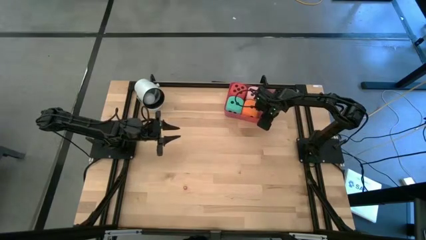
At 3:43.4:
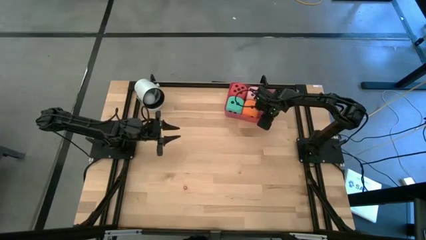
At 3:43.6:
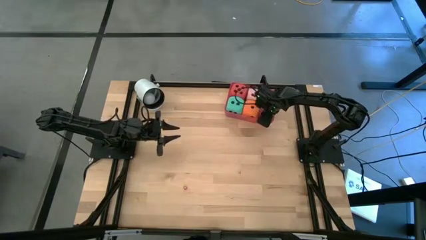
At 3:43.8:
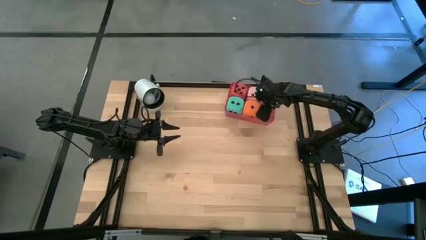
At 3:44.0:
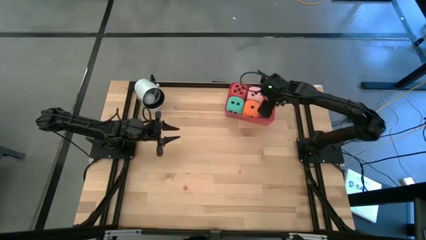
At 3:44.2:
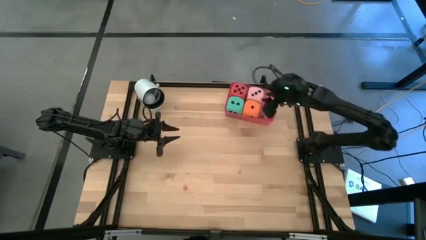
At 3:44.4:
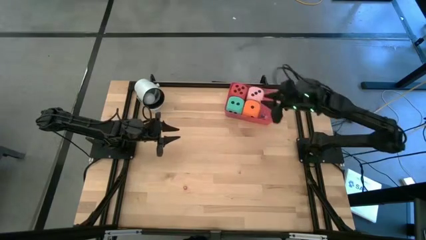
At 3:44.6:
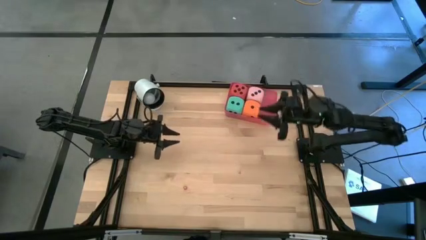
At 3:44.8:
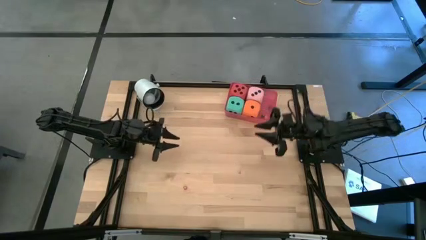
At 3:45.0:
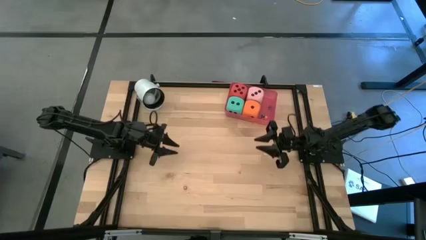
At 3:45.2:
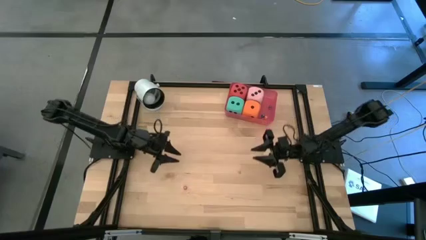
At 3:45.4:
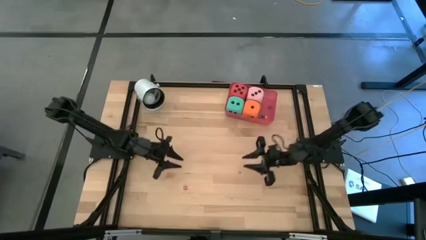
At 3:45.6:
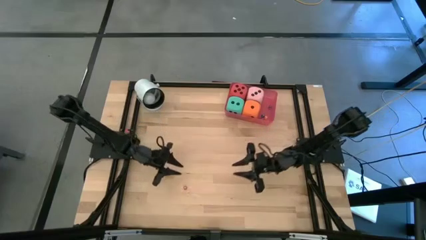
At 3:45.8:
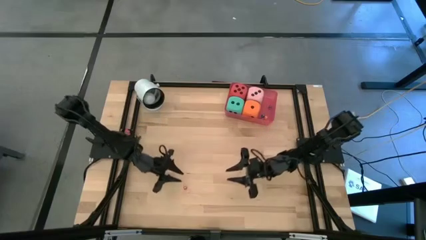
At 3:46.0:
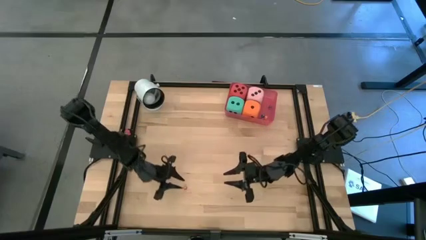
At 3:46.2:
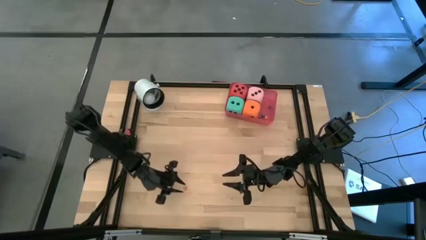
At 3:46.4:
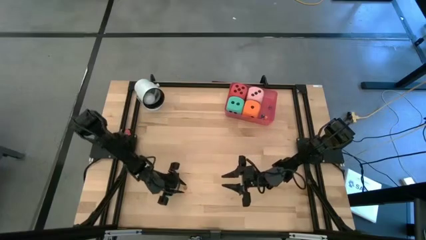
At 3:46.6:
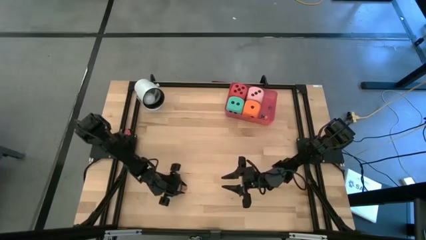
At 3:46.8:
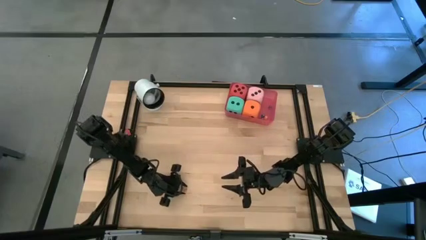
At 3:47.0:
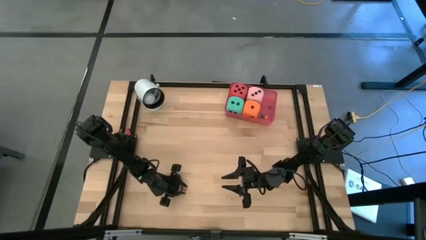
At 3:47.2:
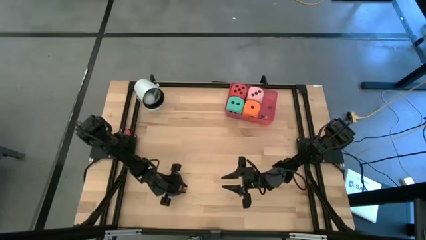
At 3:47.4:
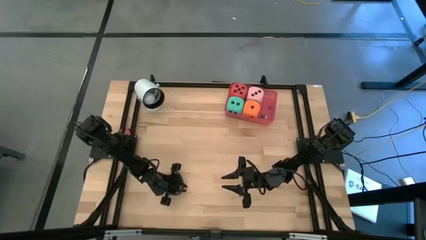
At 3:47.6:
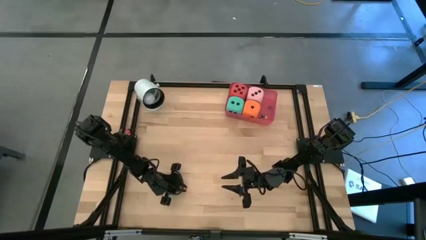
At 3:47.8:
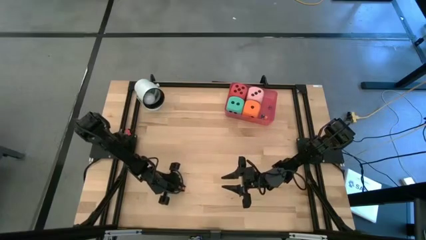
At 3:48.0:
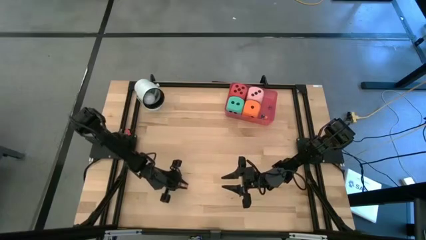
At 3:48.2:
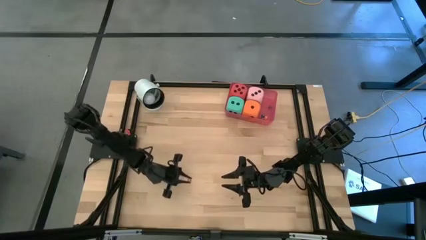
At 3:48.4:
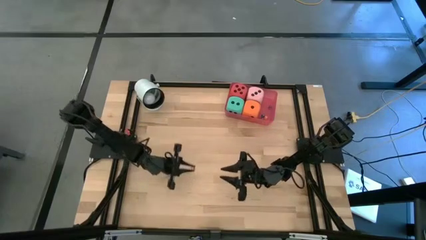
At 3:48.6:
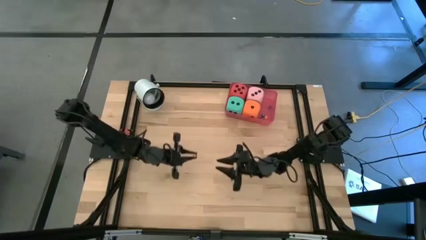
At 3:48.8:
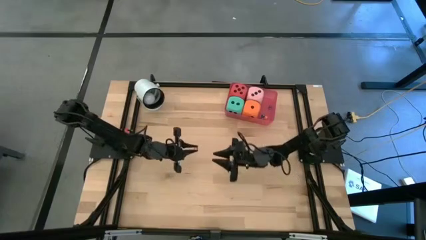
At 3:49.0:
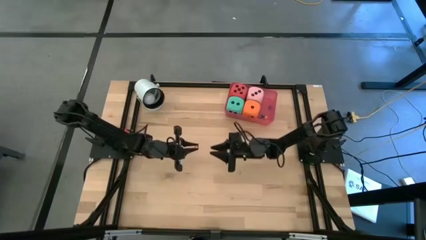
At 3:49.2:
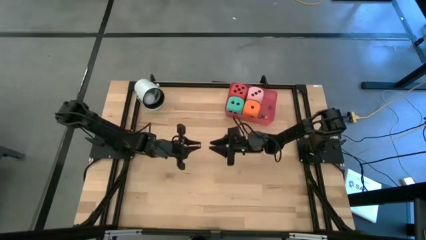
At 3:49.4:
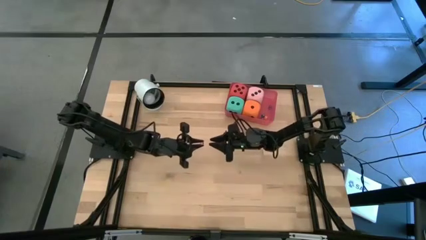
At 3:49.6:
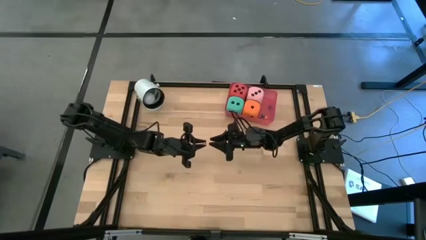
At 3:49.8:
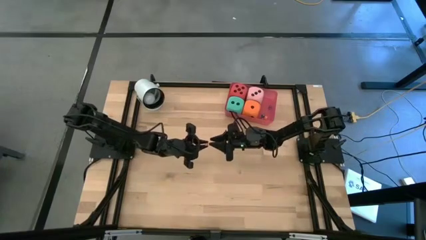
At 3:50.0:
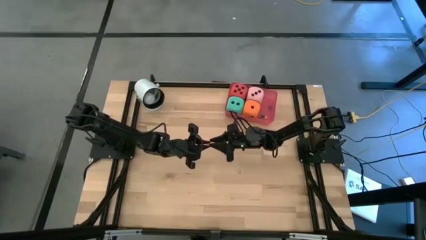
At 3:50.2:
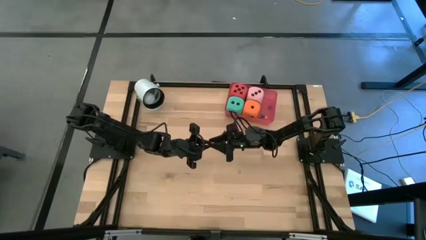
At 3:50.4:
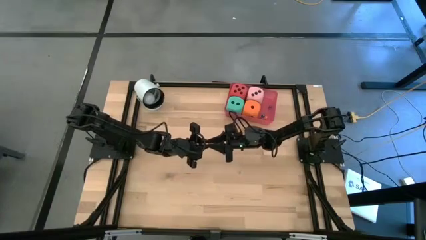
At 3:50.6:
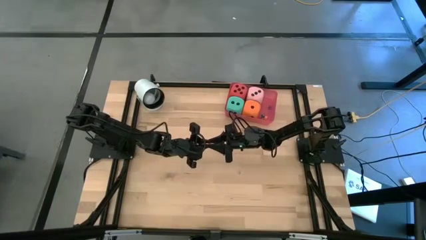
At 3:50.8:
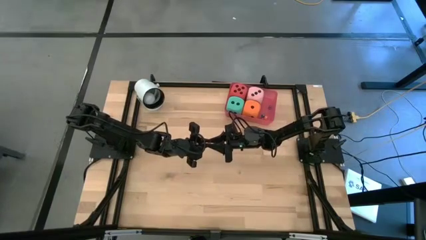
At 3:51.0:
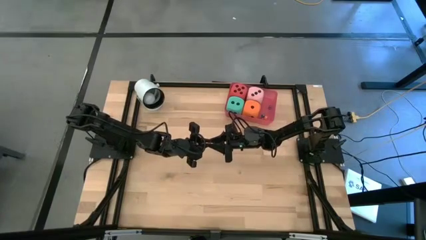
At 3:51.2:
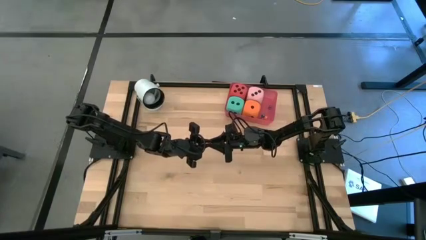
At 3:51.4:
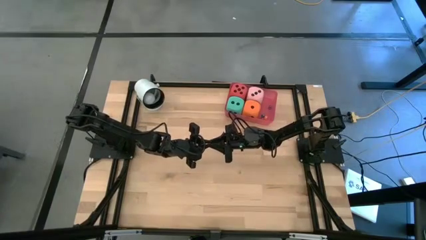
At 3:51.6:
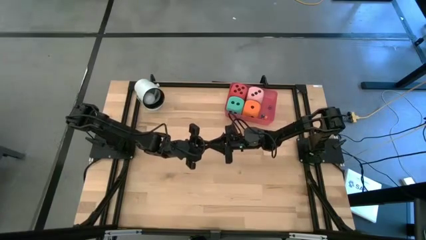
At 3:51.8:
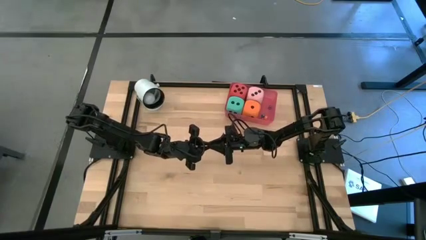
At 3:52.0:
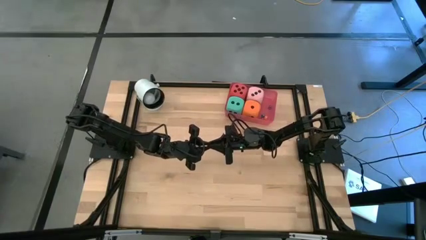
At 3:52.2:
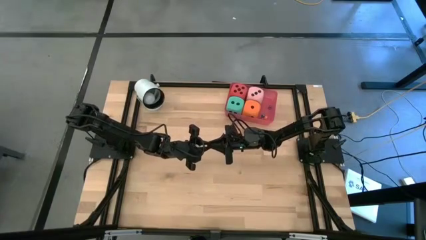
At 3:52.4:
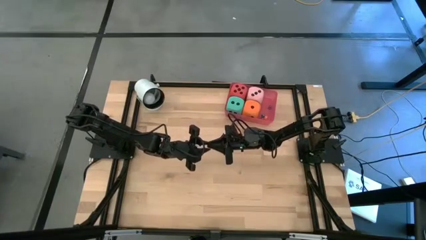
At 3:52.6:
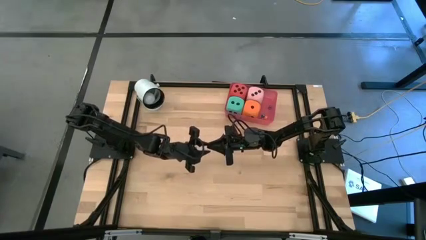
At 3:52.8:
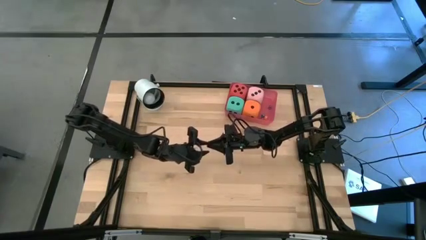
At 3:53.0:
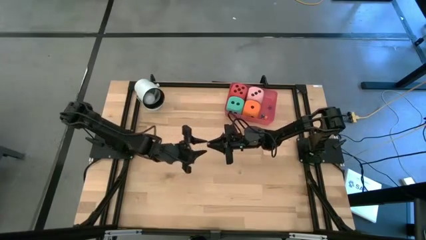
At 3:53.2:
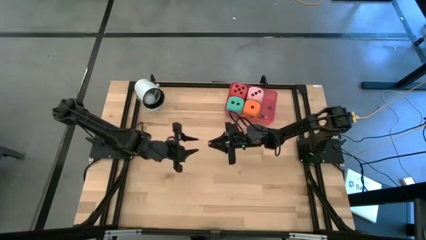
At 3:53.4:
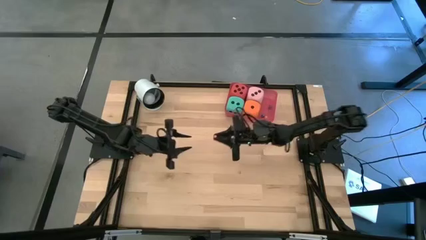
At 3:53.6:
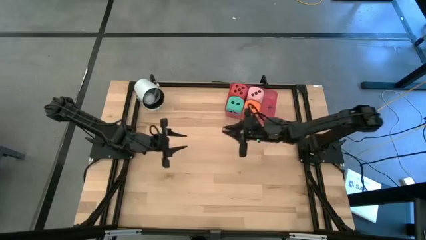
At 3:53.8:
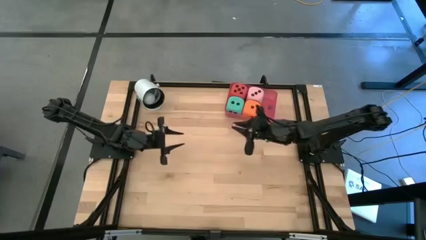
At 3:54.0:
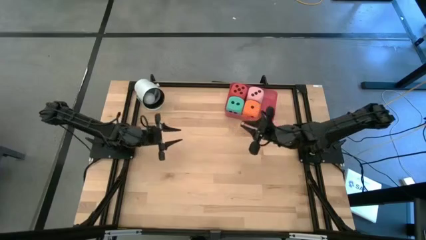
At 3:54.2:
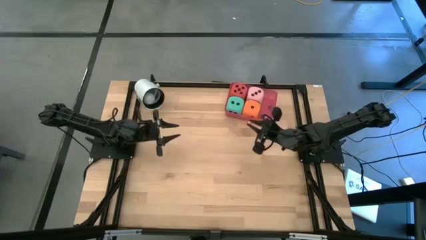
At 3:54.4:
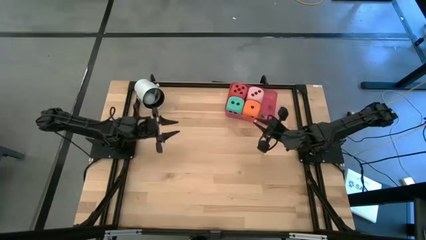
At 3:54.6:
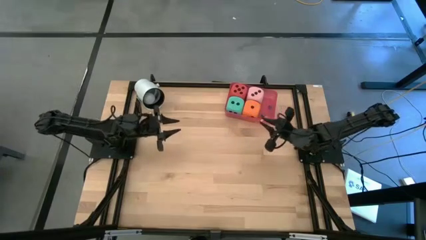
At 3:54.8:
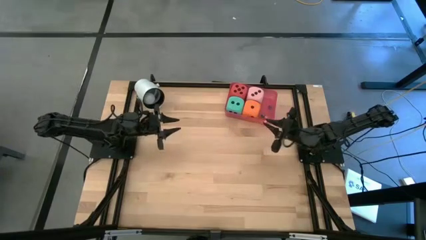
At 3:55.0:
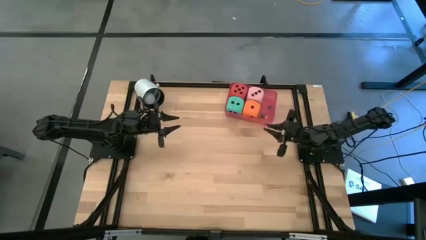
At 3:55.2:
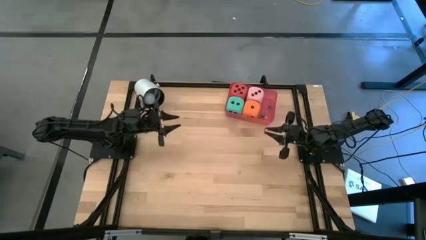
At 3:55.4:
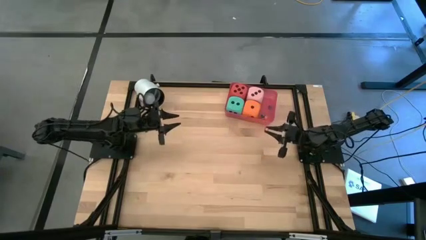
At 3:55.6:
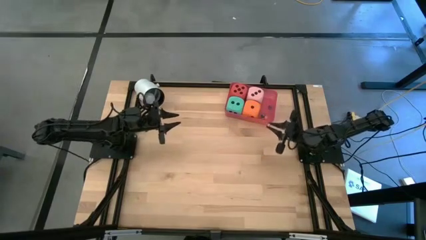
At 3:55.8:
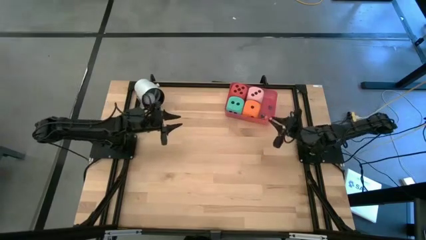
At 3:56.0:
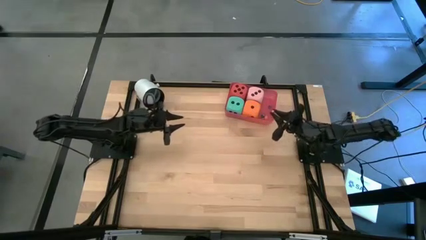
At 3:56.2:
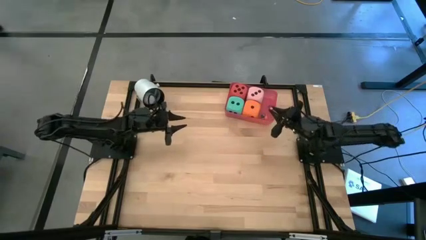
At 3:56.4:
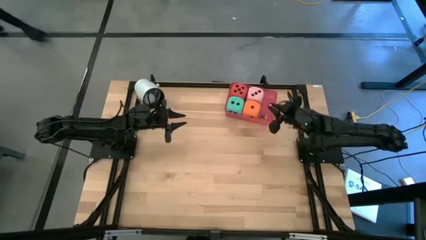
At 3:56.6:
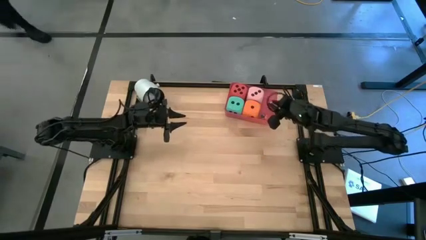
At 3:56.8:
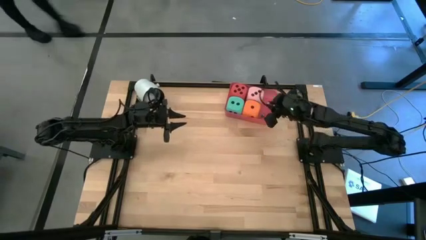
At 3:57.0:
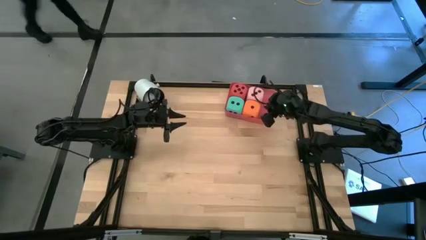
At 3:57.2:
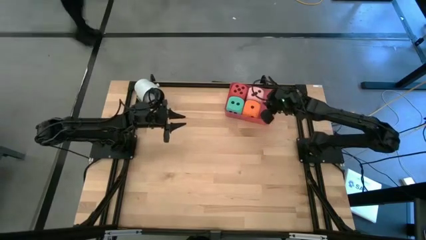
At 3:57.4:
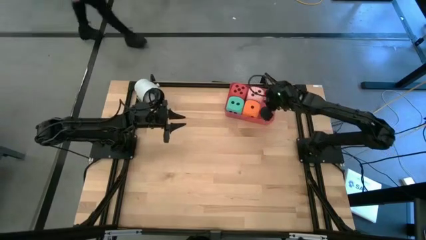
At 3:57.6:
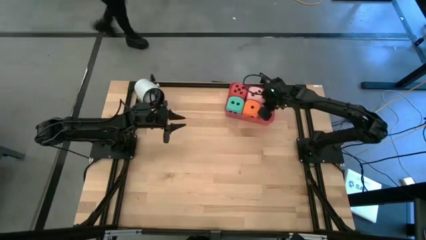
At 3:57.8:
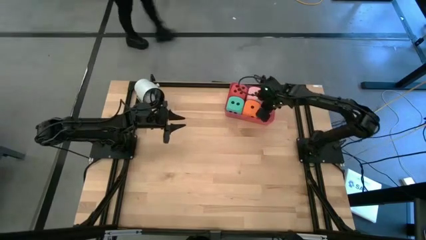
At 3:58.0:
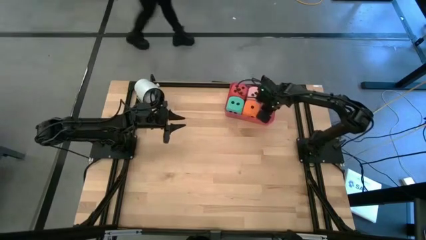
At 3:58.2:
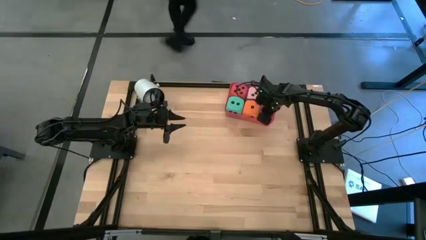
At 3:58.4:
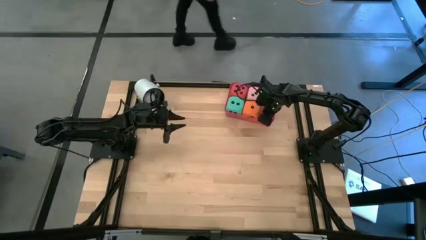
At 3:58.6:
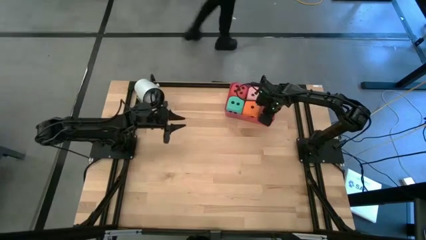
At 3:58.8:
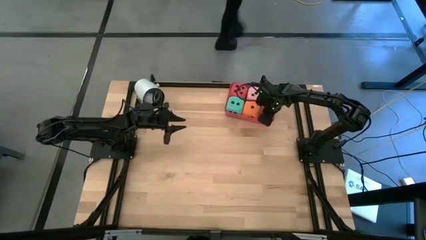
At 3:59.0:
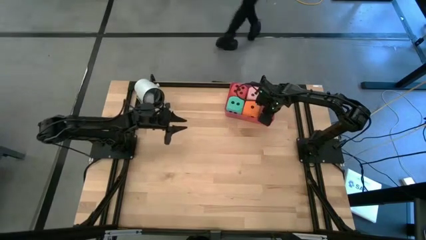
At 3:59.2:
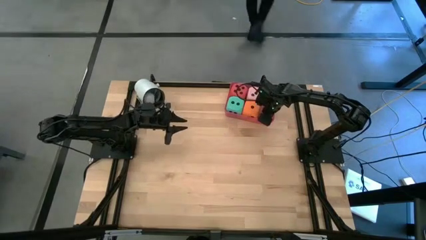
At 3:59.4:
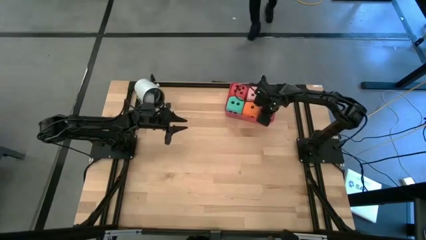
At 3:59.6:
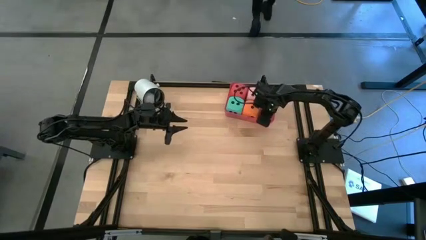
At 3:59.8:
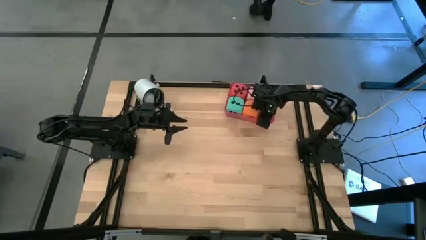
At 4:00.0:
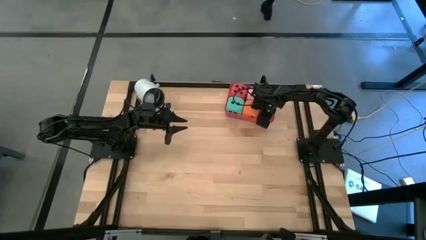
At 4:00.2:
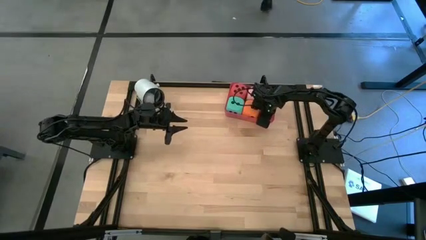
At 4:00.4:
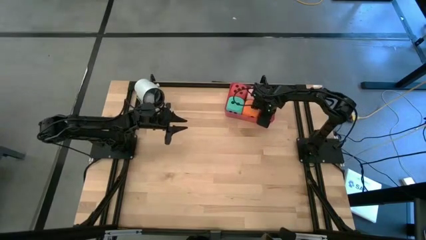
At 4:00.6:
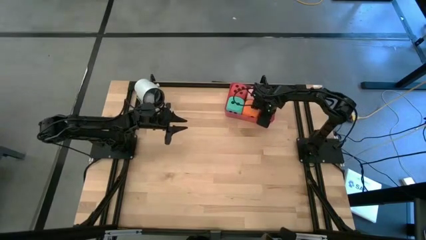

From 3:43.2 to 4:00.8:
Task: Pick & Place Dice
Put the small red dice into the red bin
